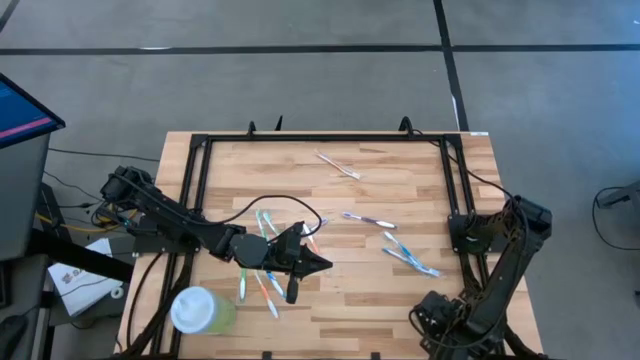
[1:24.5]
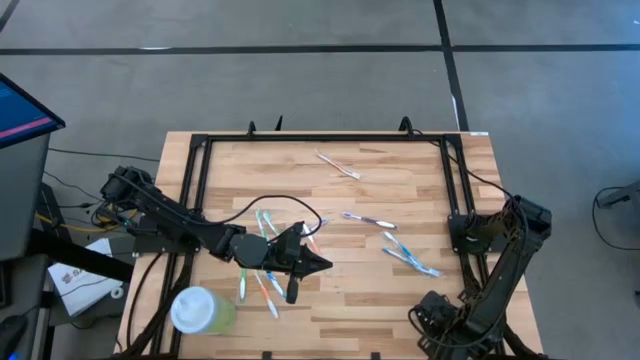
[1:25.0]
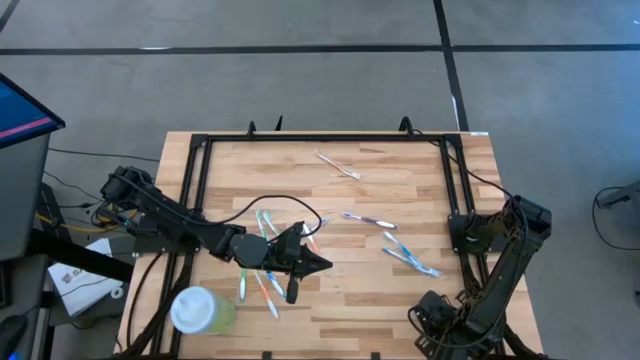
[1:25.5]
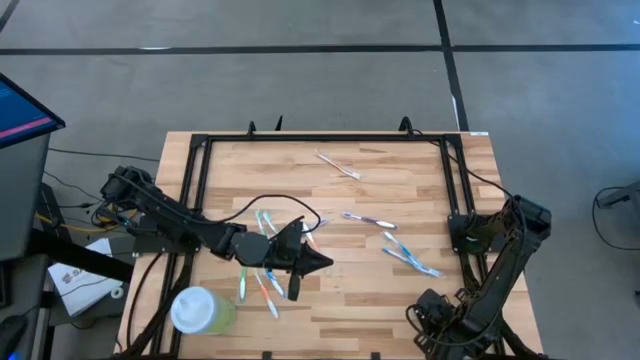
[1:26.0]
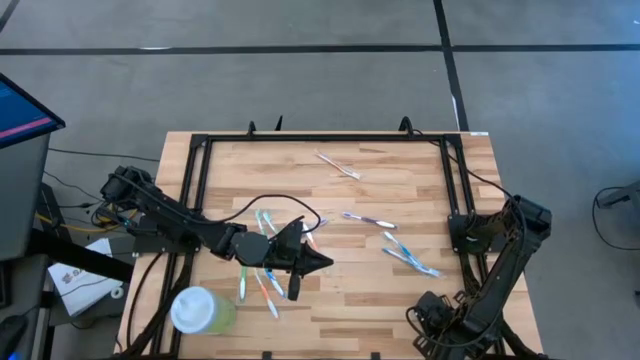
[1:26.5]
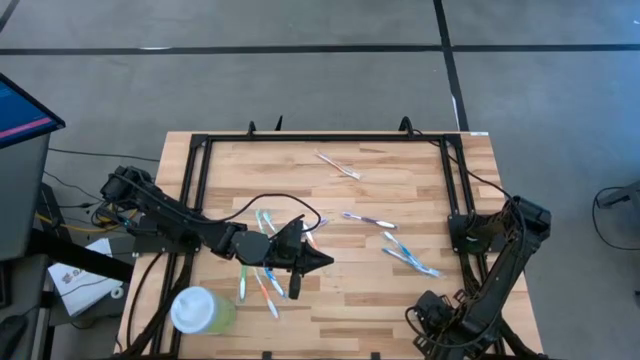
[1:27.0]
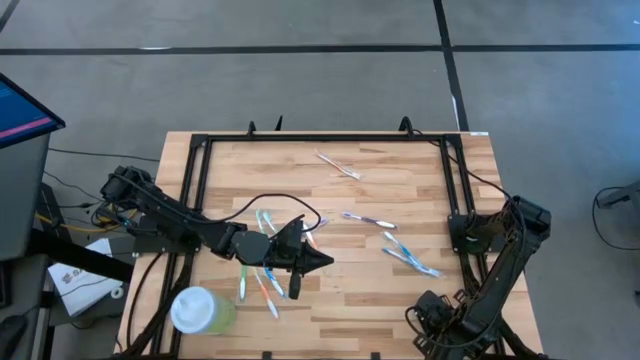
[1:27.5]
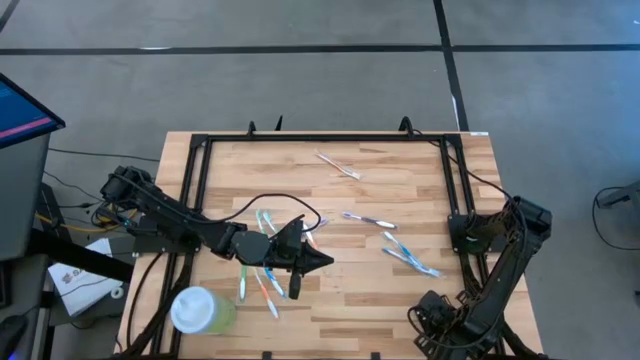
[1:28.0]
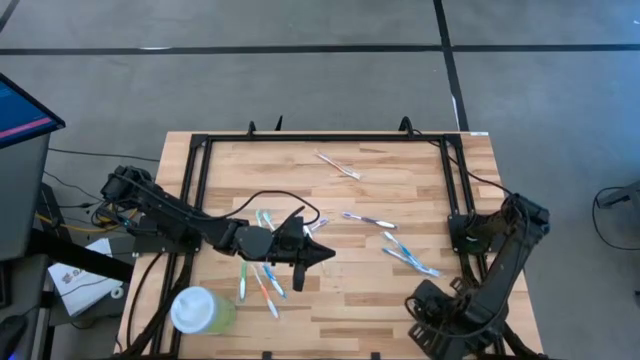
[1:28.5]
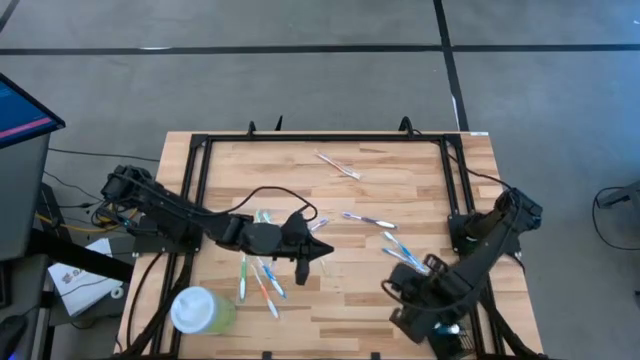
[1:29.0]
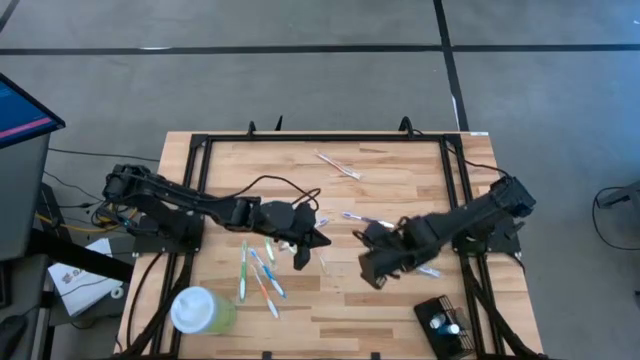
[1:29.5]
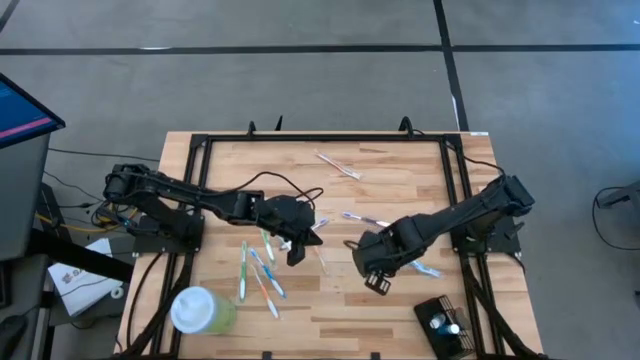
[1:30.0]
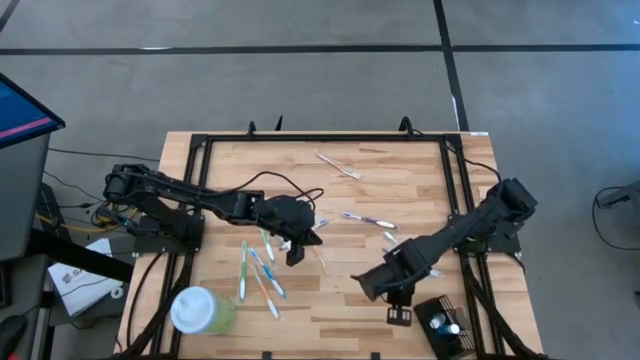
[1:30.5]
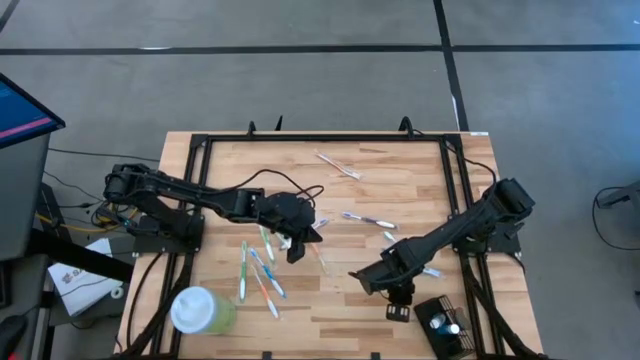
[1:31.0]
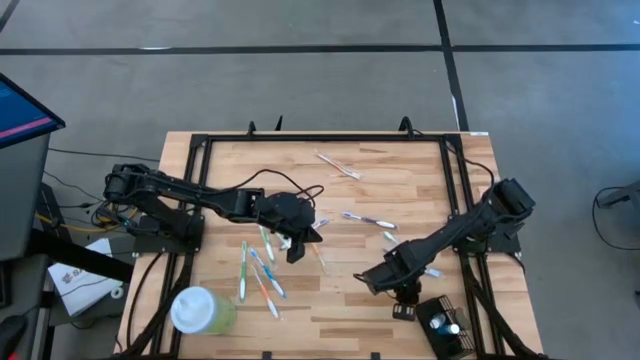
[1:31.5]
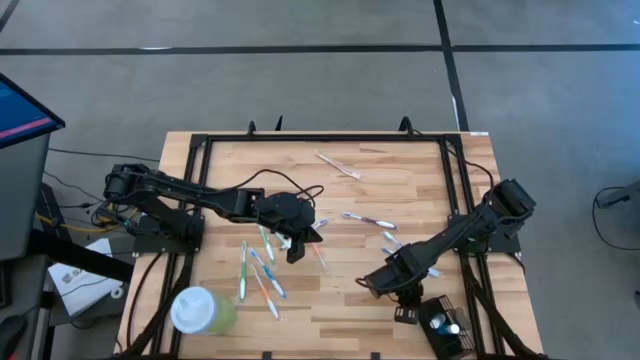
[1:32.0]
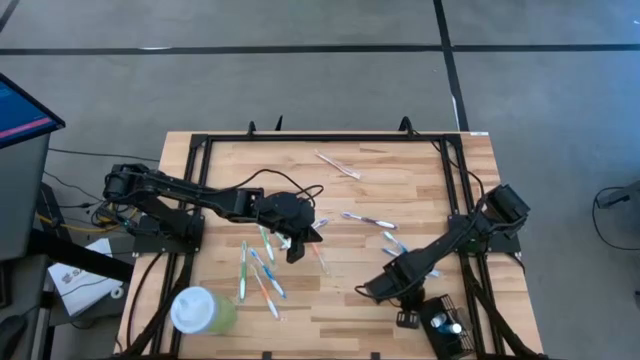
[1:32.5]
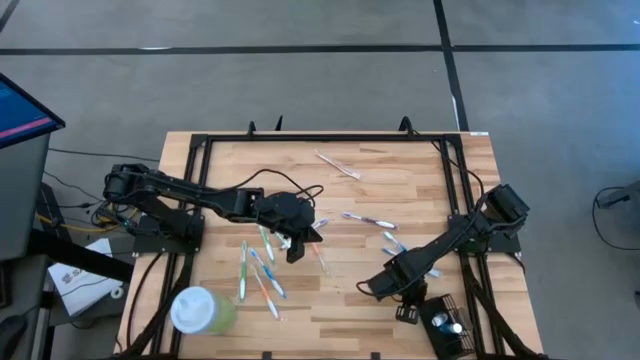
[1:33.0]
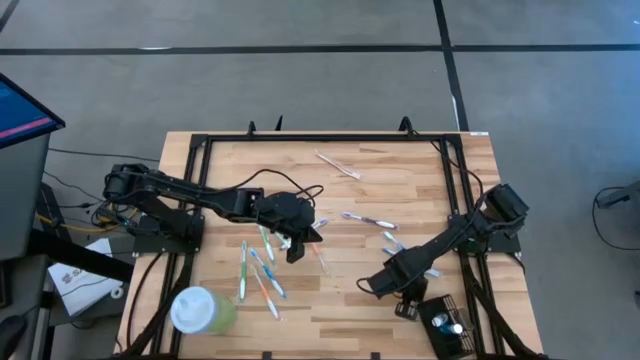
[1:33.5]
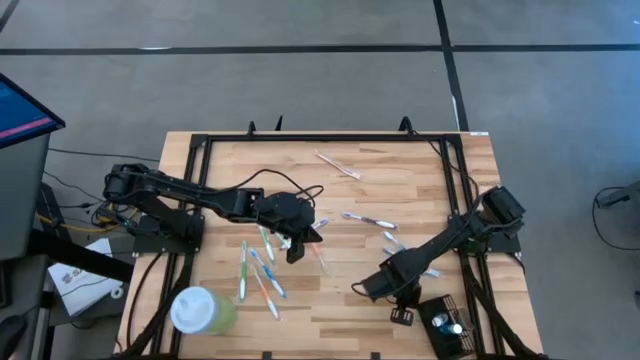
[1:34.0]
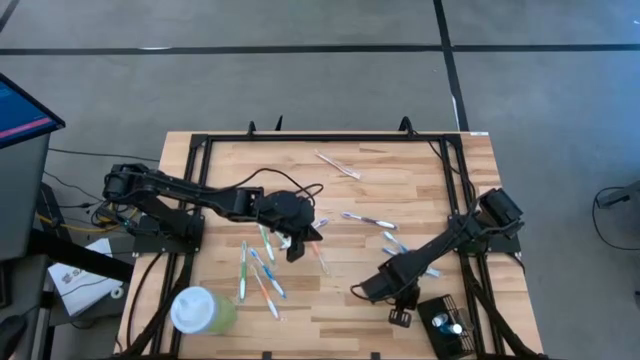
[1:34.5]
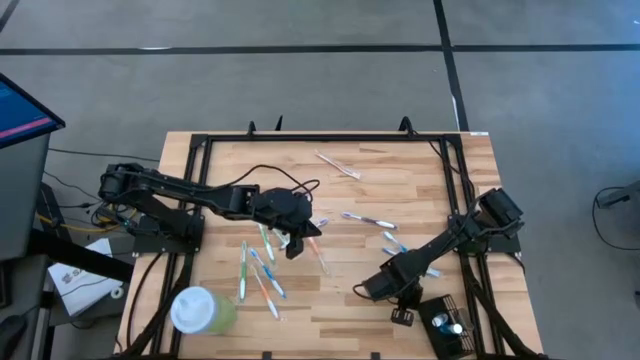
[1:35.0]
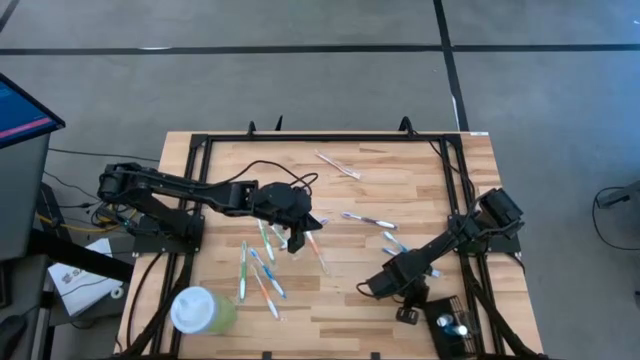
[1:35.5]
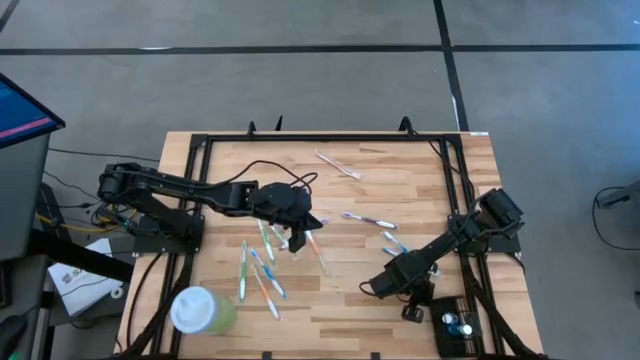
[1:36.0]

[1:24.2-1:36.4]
Task: Pick & Place toothbrushing station
Adjust the black organizer on the table

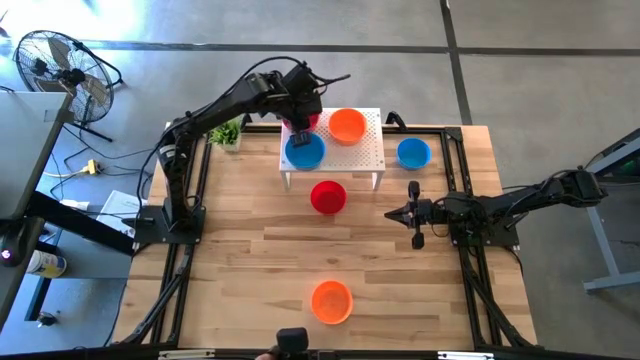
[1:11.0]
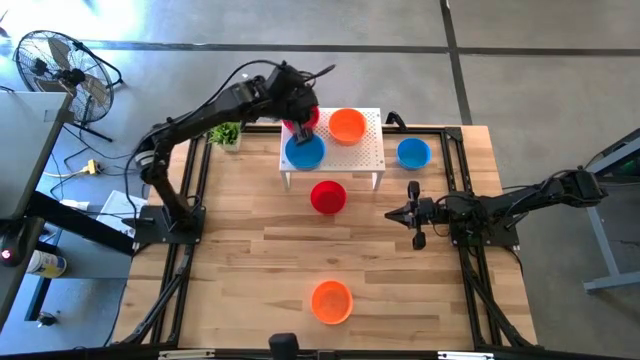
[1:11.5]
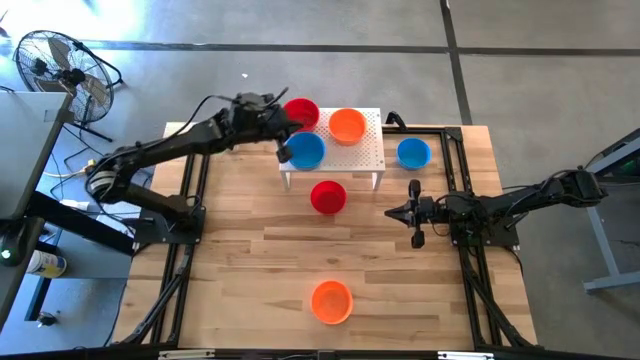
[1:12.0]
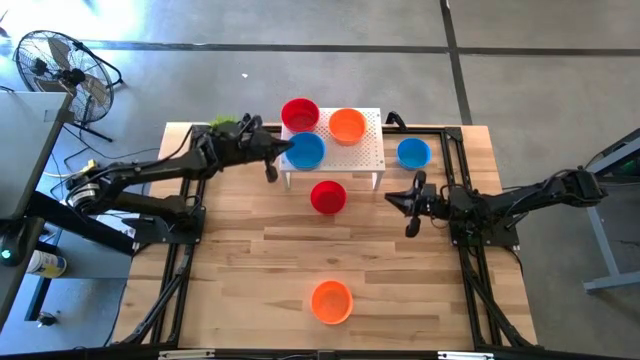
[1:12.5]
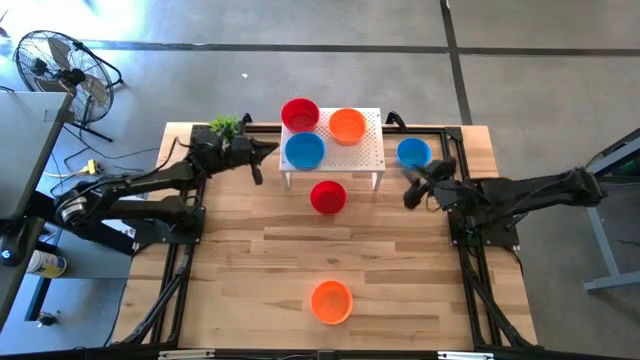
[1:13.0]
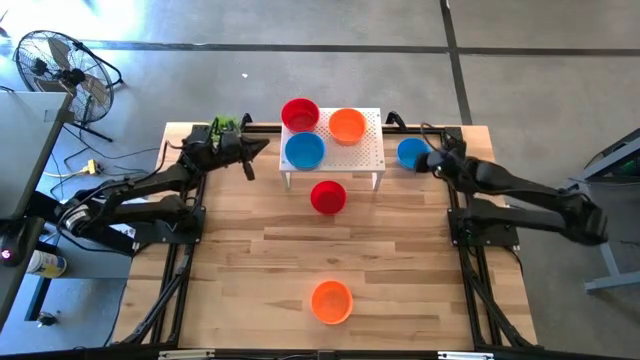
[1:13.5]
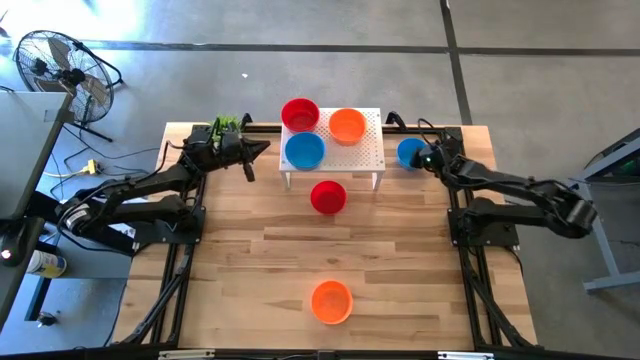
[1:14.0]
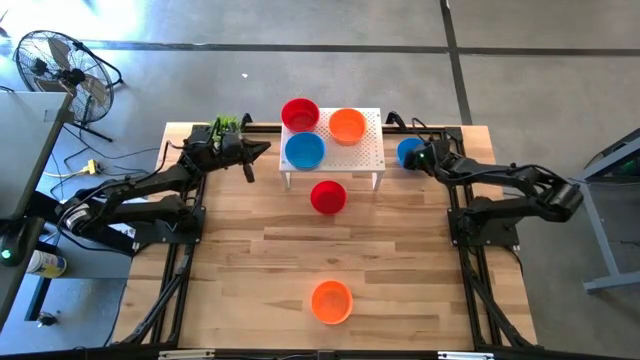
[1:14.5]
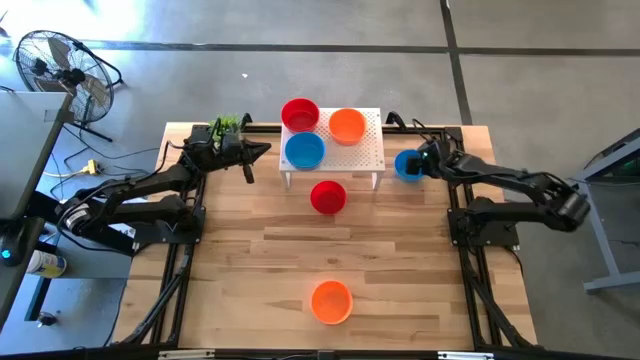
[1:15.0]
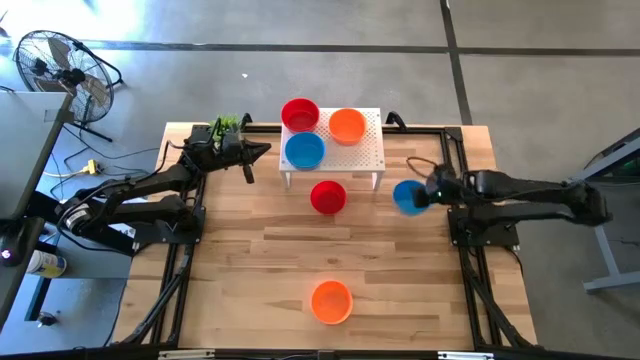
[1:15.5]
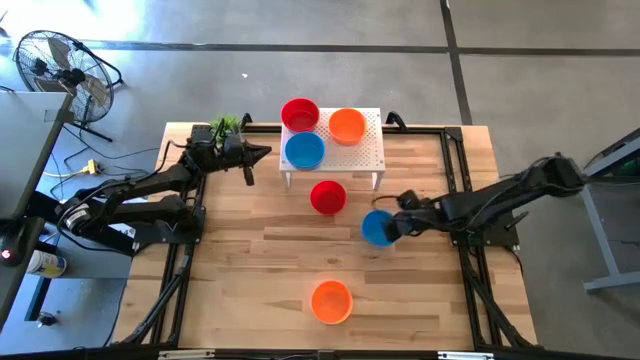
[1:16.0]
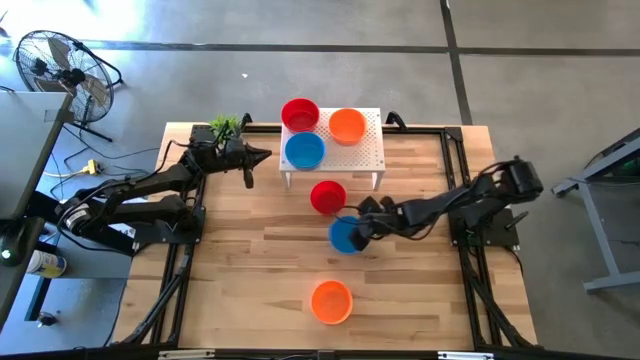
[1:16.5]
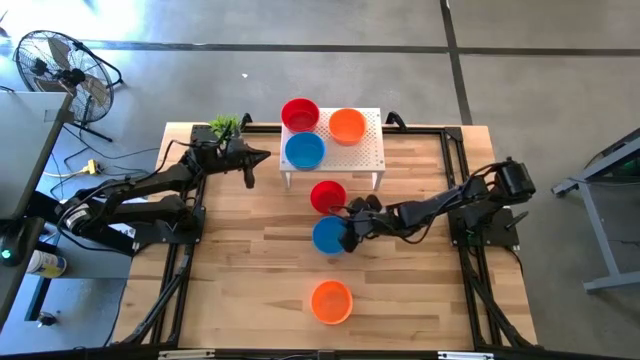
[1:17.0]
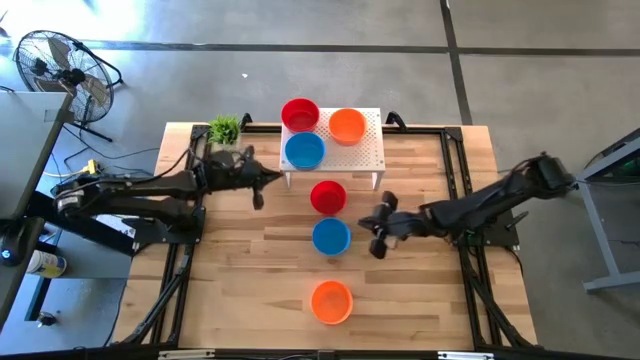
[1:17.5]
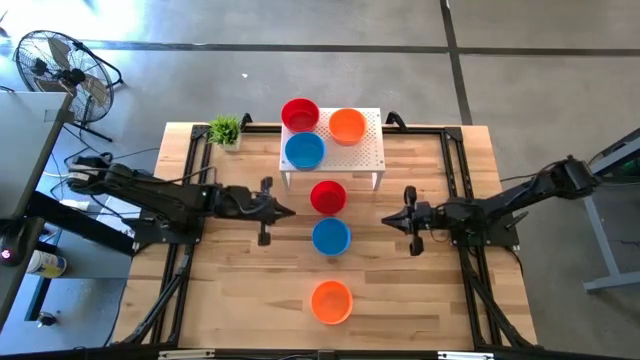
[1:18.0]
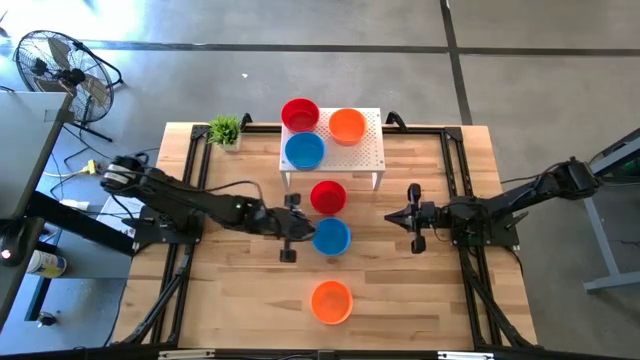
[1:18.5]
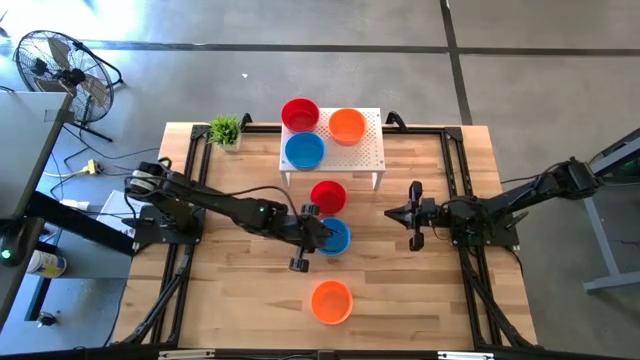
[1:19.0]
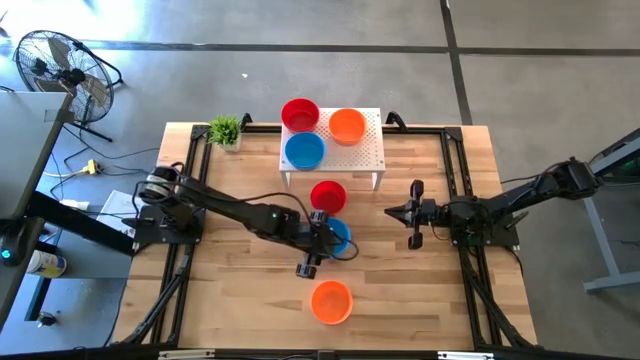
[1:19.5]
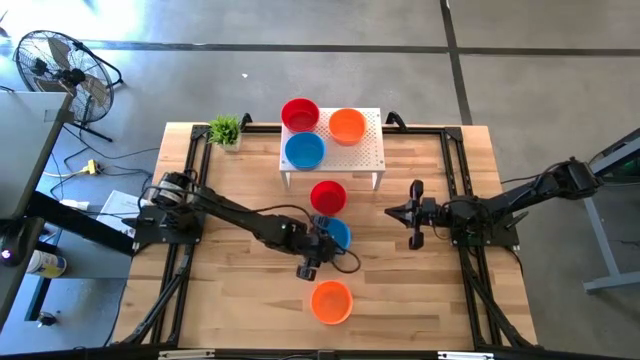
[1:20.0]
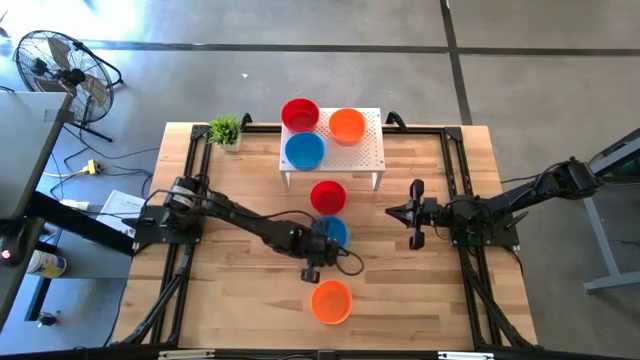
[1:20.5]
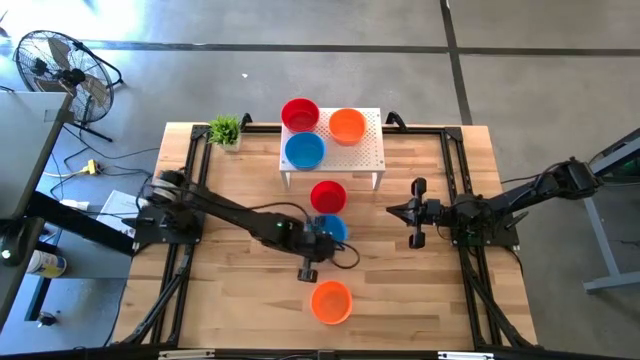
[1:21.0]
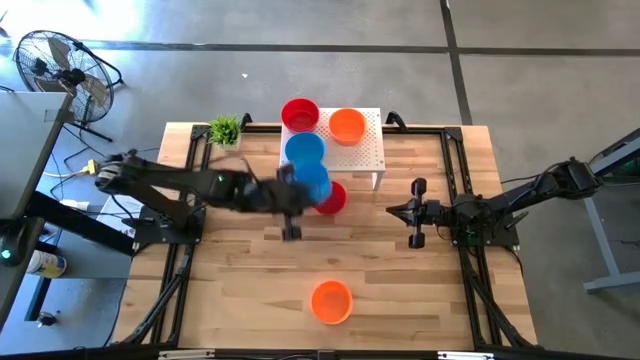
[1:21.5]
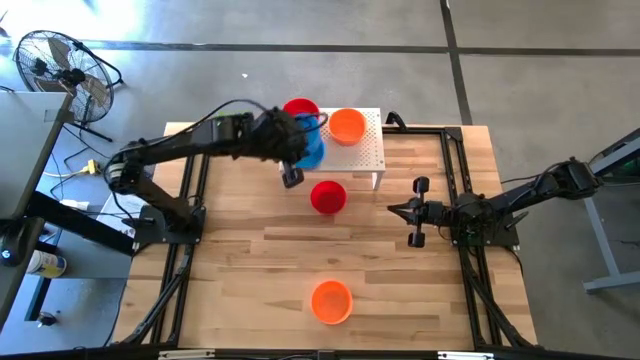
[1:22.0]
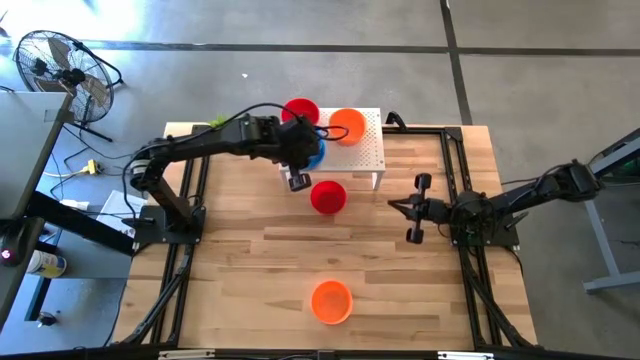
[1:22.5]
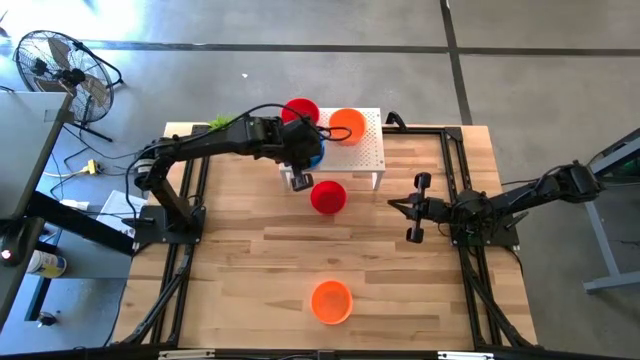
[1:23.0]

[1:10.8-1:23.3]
Task: Pick & Place Mini bowls
Stack the blue bowl on top of the blue bowls on the shelf
